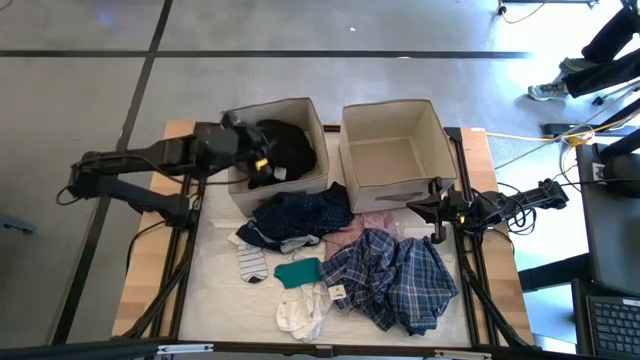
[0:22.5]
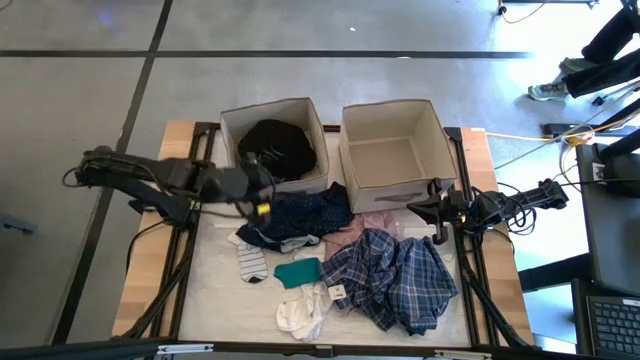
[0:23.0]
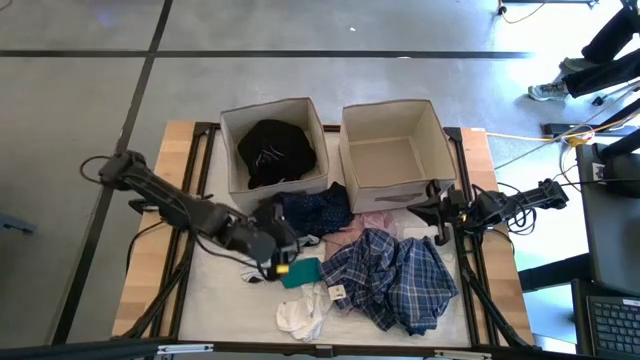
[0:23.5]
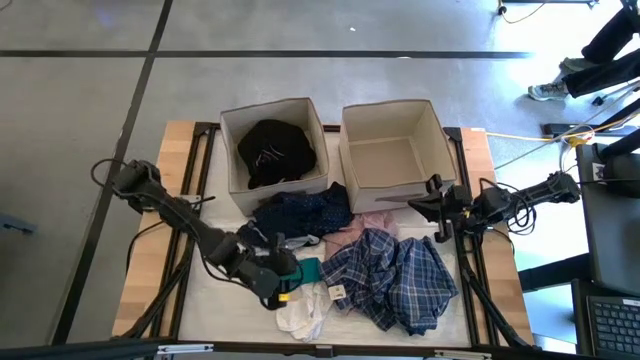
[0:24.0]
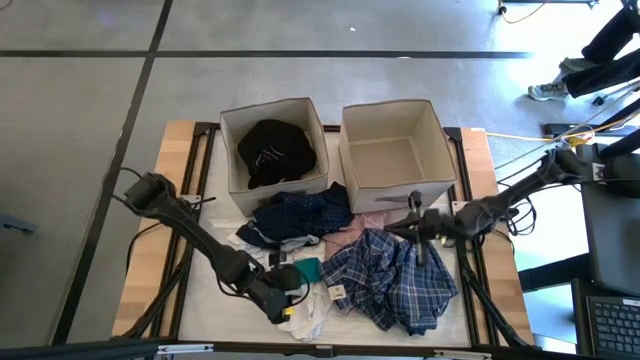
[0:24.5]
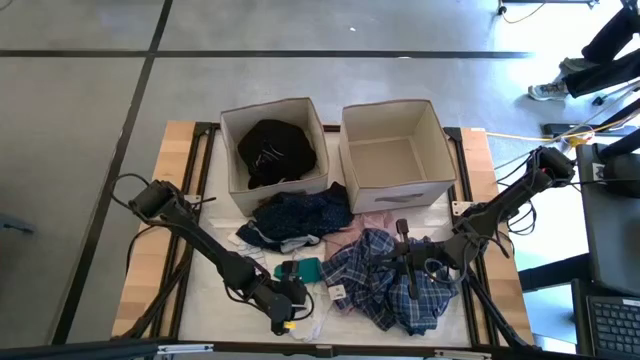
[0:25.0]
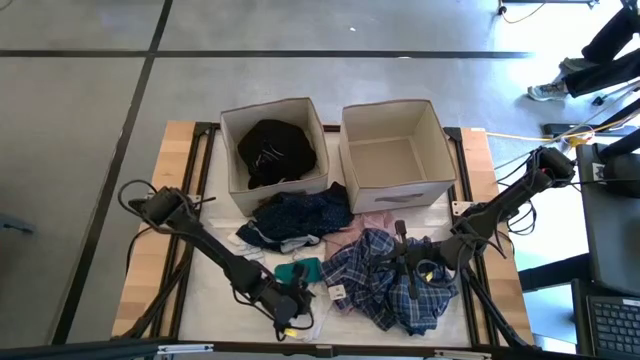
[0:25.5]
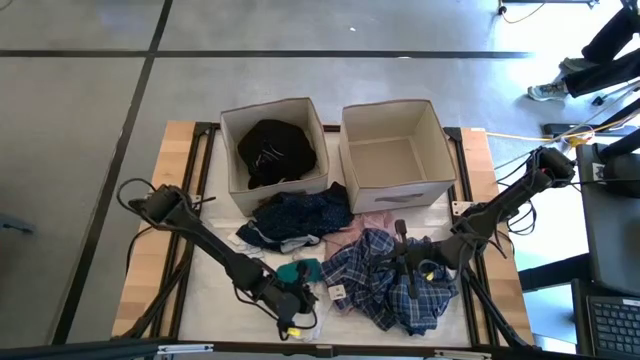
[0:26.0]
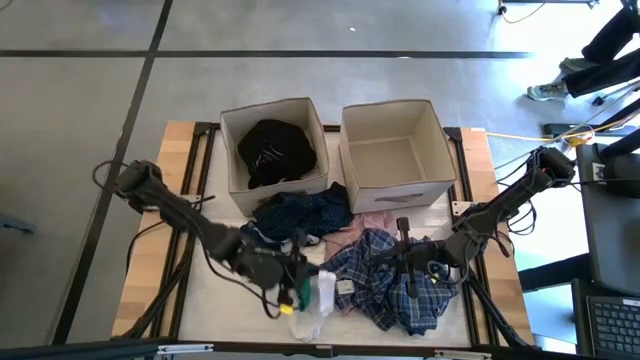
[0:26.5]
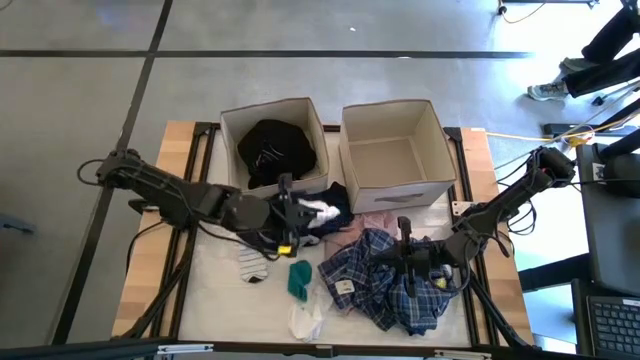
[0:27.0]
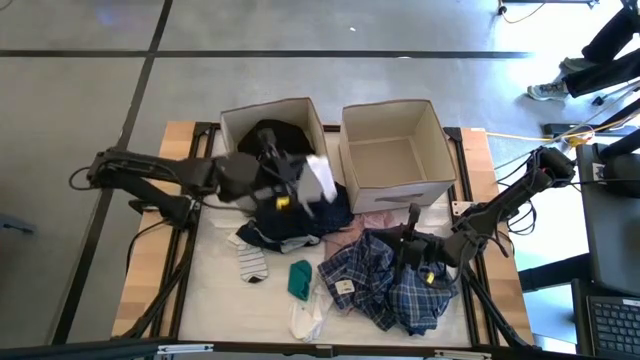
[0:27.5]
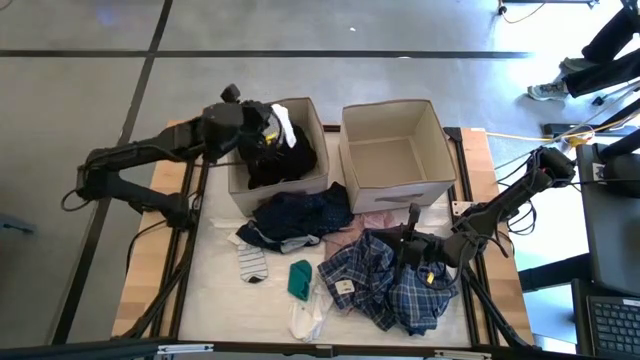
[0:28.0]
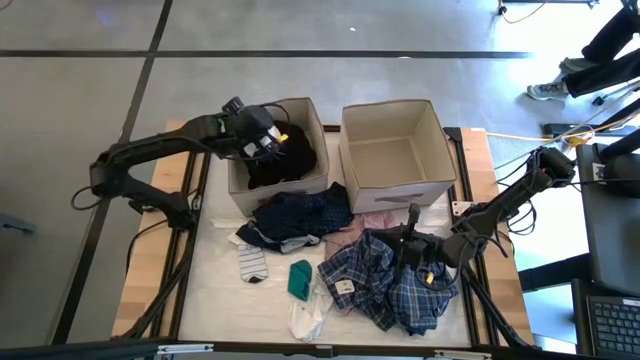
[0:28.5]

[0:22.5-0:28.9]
Task: Sort clothes
Put the white sock into the left laundry organizer

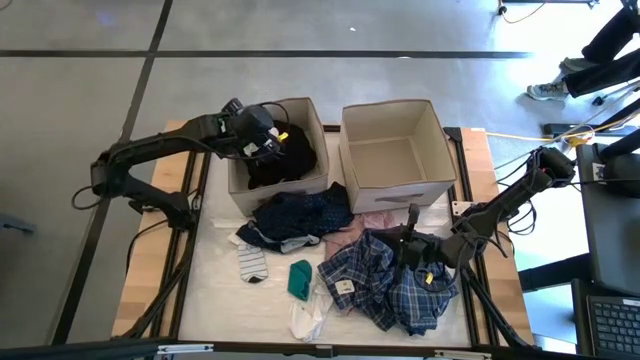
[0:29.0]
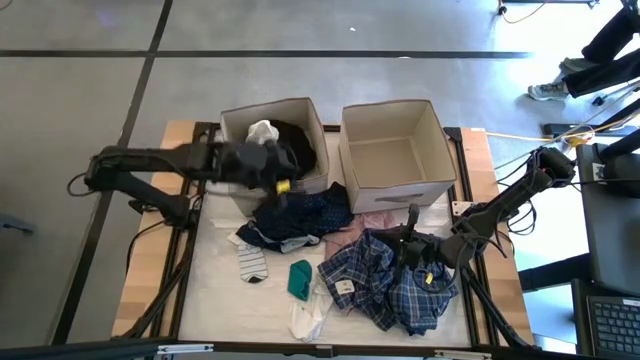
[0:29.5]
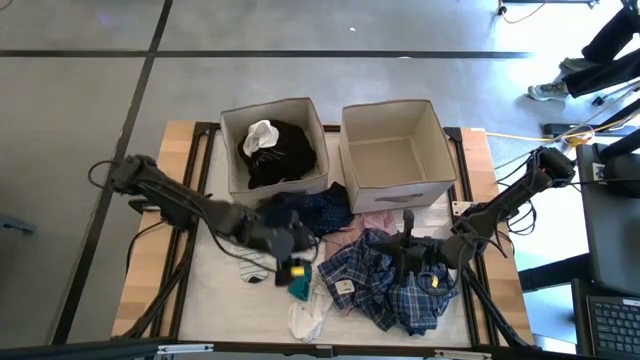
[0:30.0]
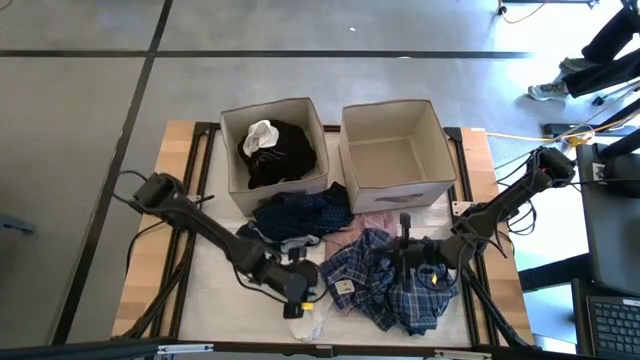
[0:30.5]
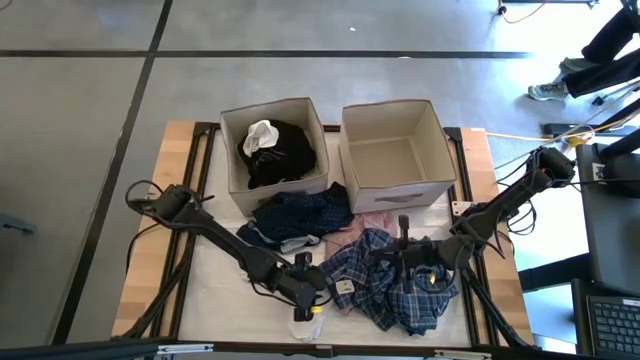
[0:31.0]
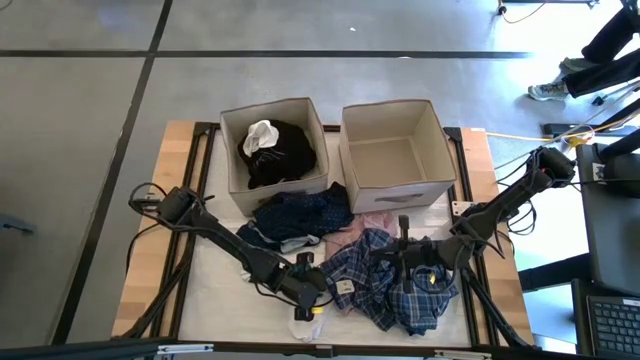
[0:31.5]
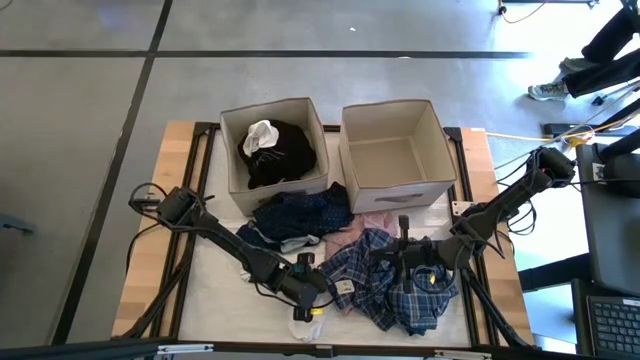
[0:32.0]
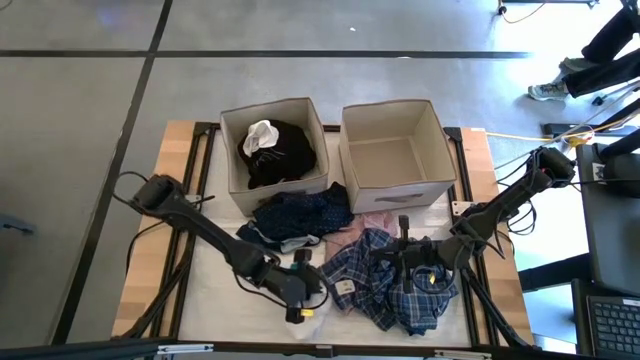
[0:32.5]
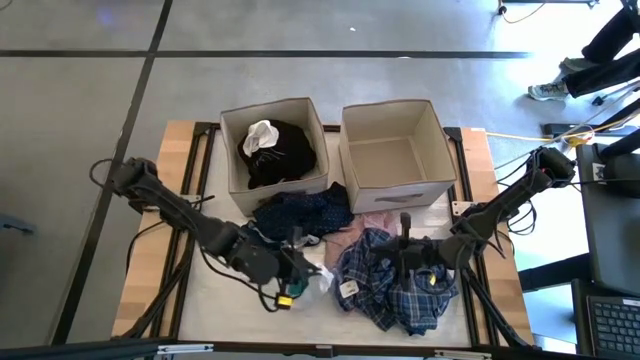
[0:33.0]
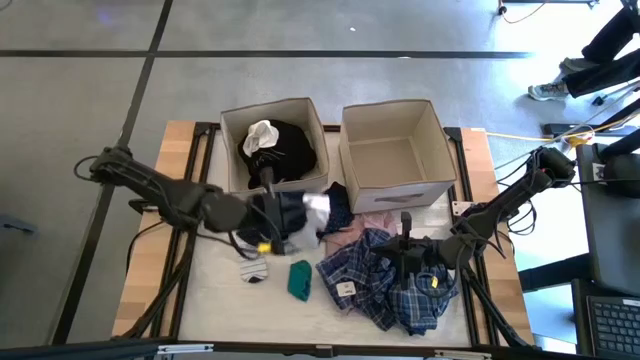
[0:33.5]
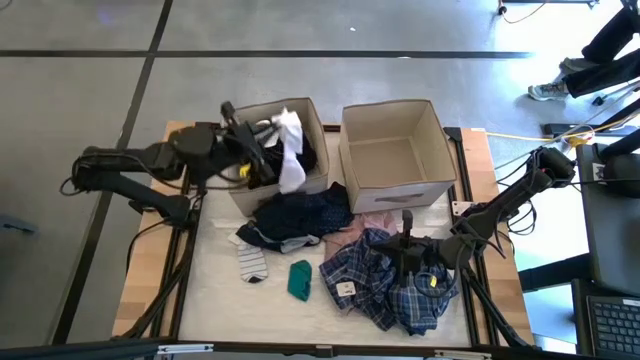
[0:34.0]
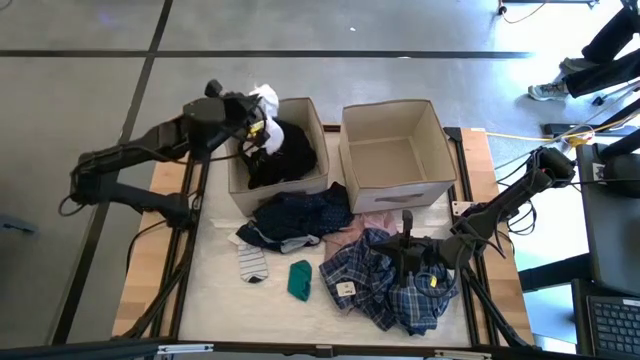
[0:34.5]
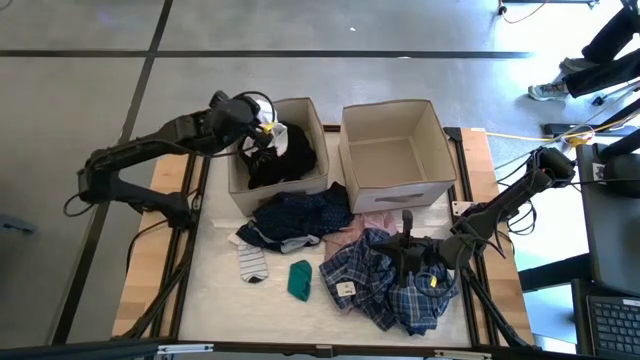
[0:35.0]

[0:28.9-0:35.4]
Put the white sock into the left laundry organizer

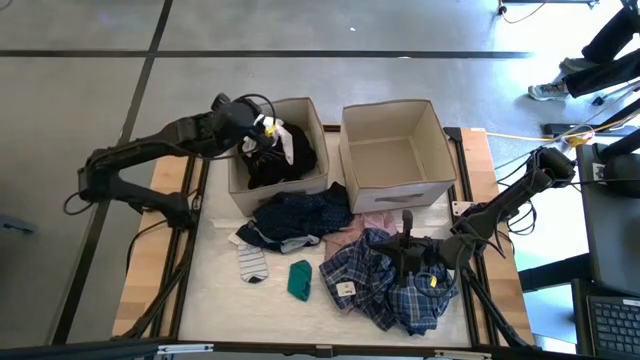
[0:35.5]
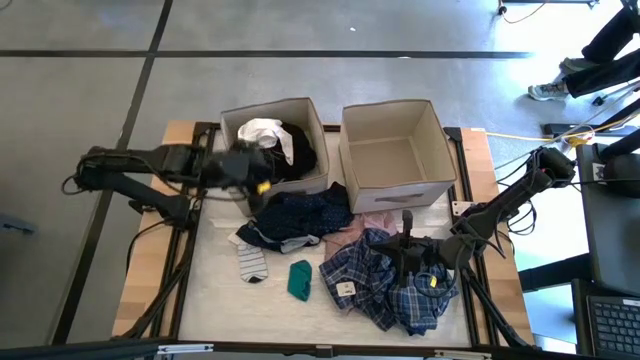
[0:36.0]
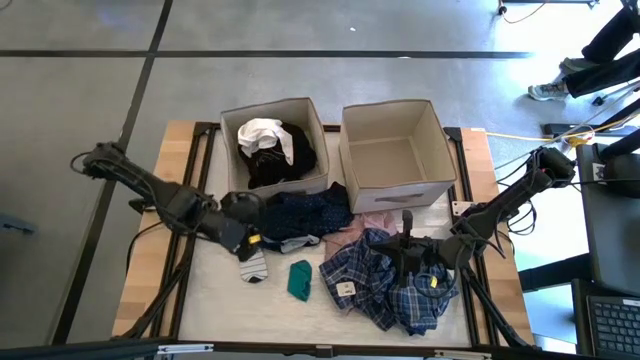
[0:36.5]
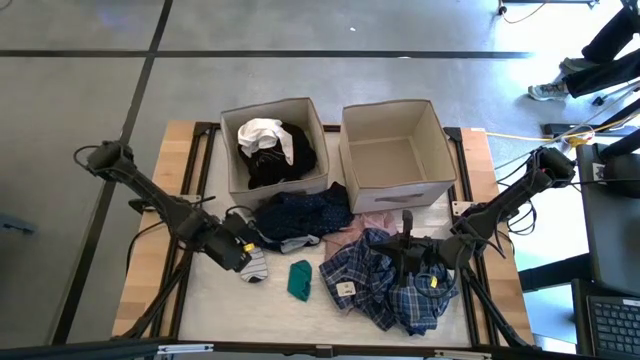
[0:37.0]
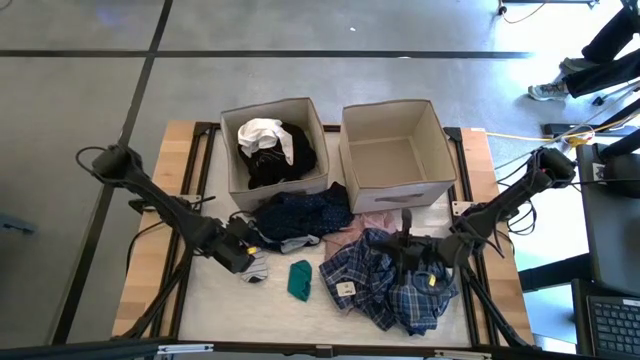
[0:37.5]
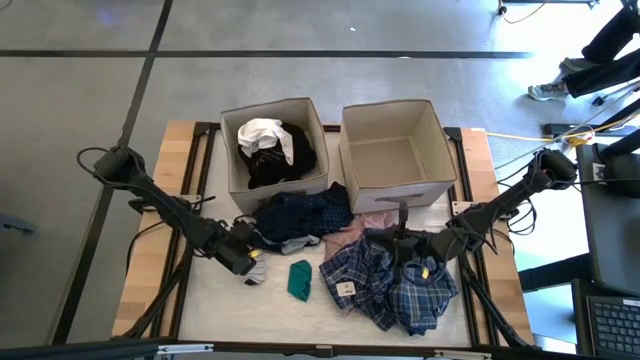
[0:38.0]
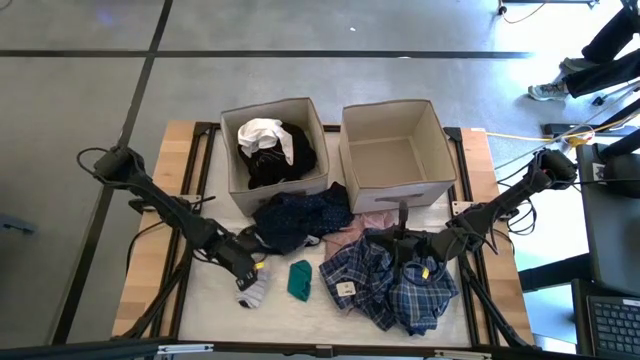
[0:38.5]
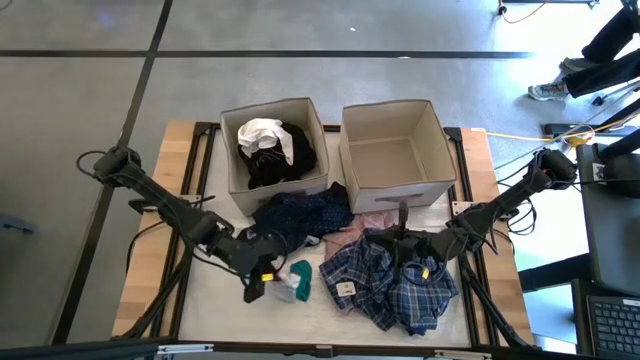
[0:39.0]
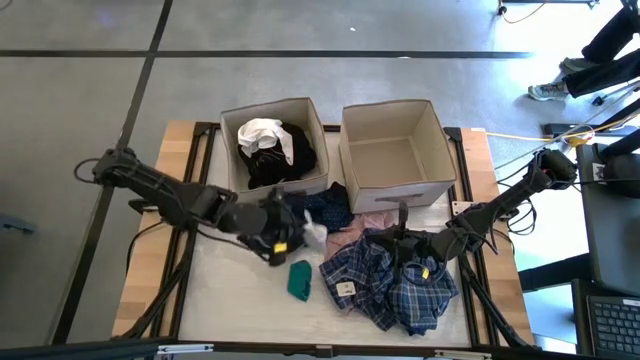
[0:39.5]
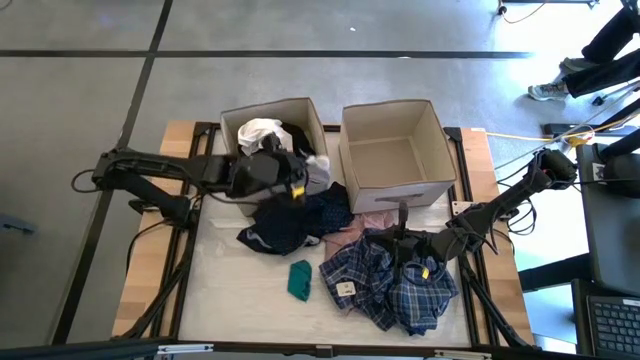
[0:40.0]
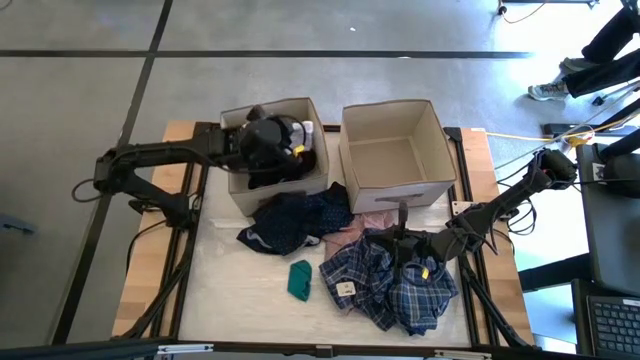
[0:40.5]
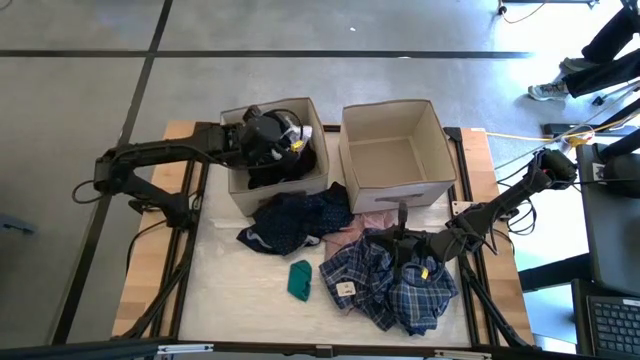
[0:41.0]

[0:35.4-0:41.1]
Put the white sock into the left laundry organizer

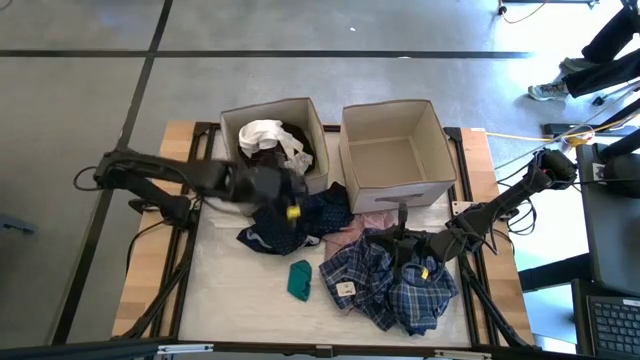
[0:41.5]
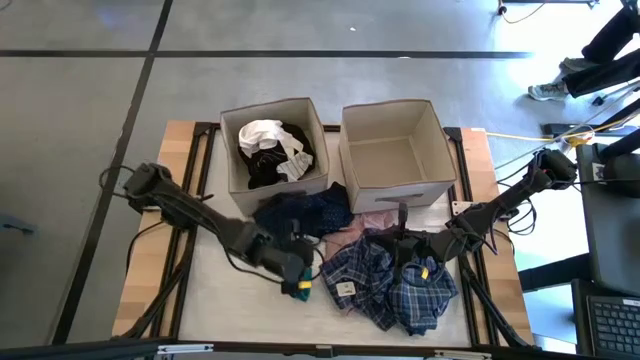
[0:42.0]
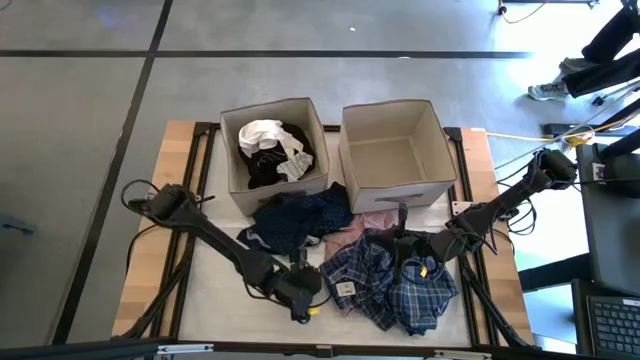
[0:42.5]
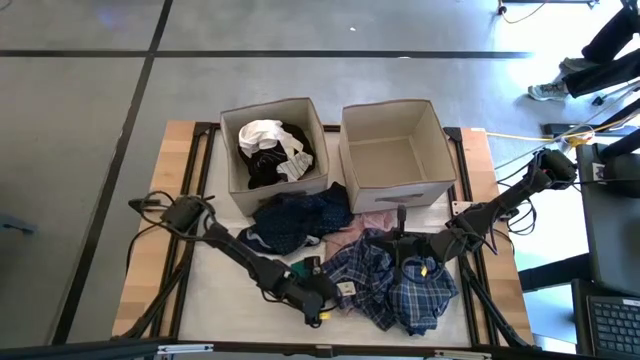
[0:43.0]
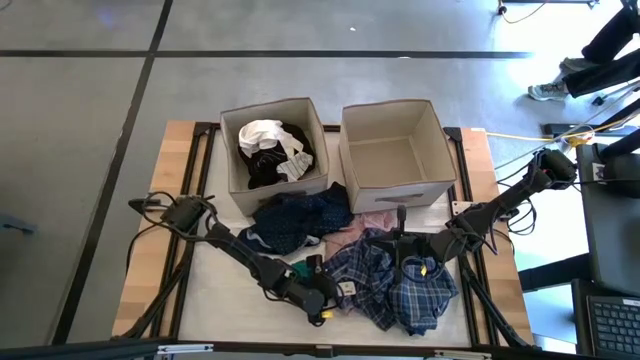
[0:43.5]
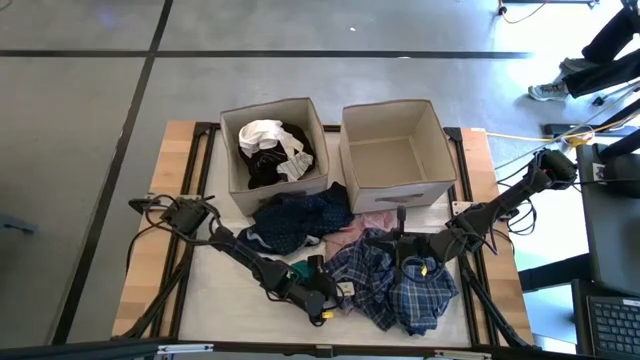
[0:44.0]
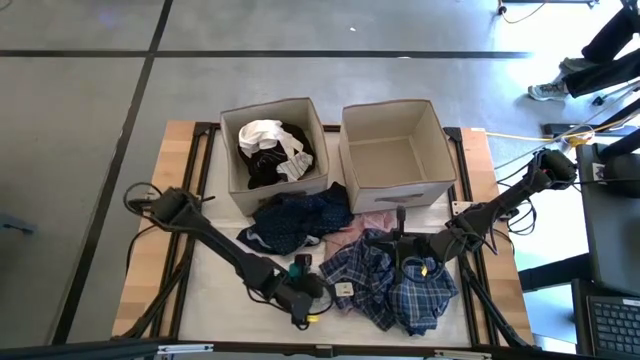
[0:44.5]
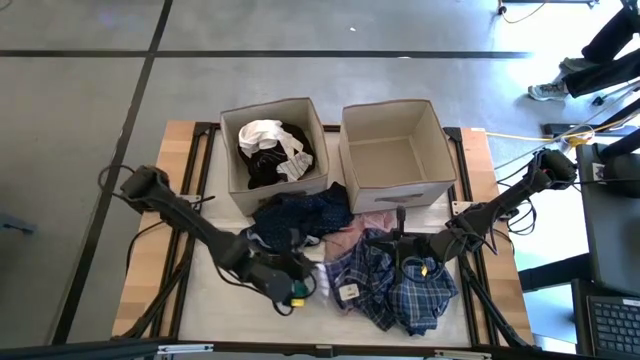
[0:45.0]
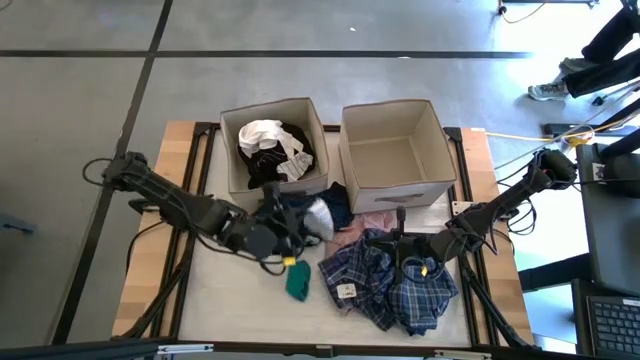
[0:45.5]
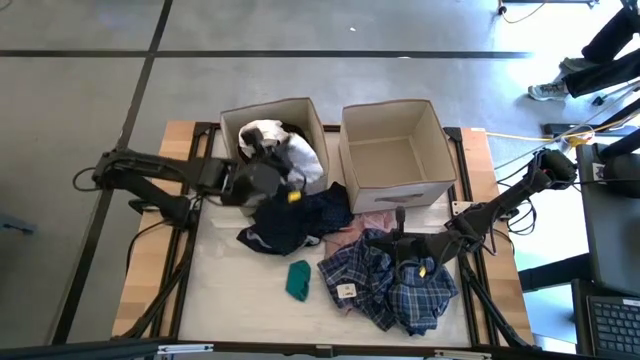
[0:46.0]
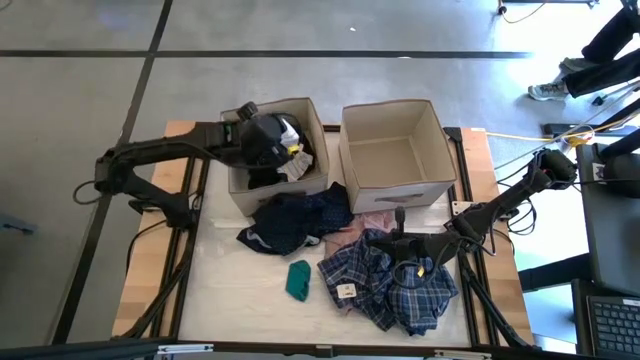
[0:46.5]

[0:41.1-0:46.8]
Put the white sock into the left laundry organizer
